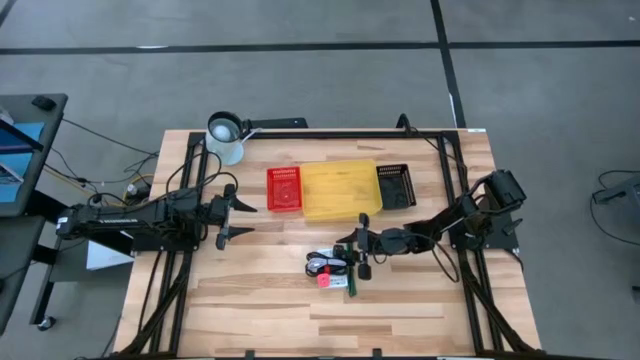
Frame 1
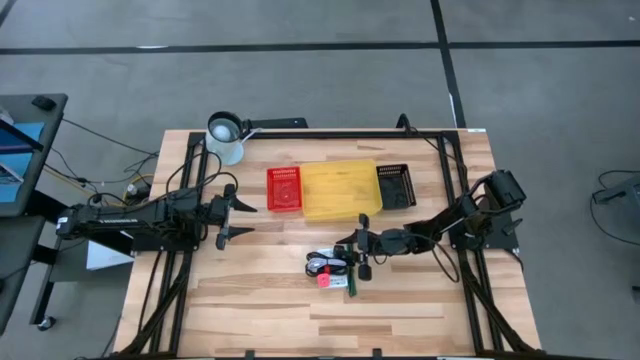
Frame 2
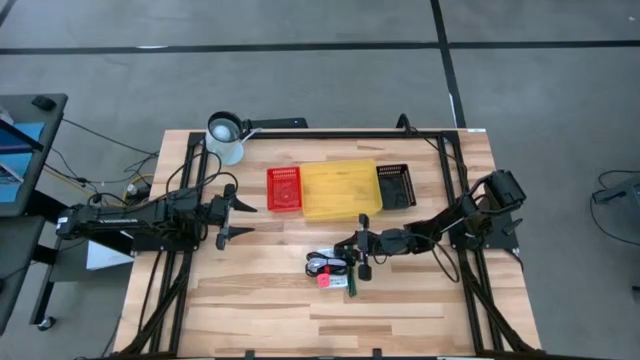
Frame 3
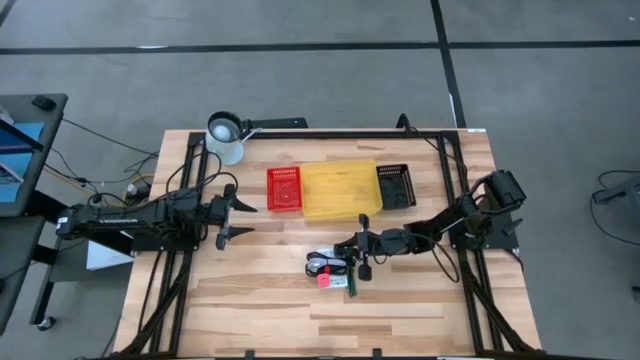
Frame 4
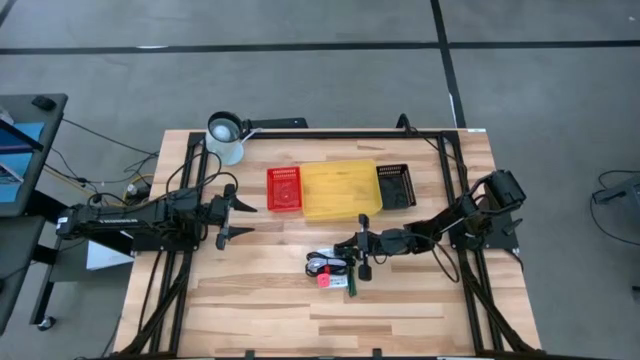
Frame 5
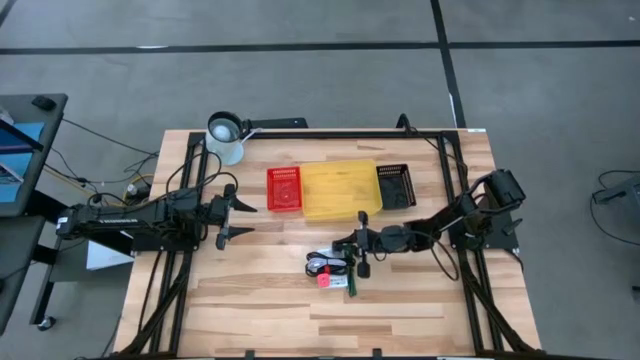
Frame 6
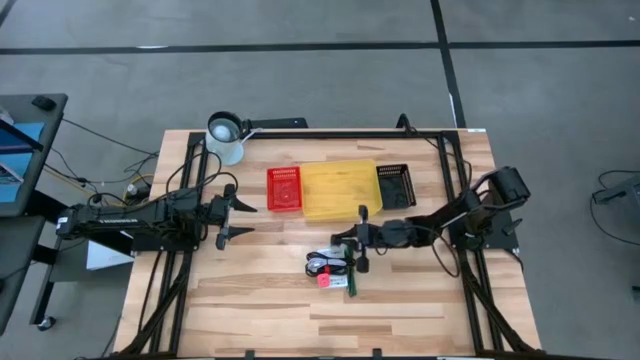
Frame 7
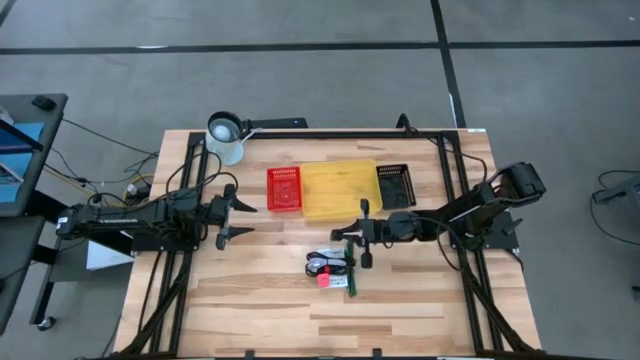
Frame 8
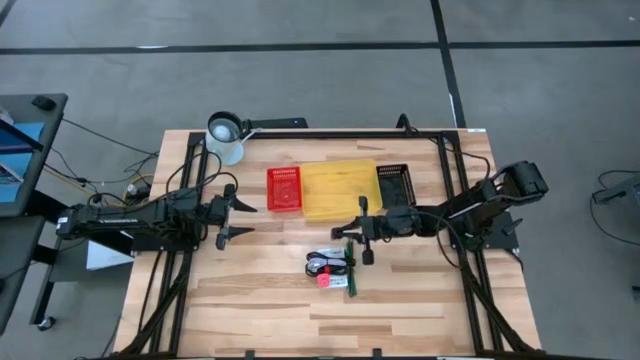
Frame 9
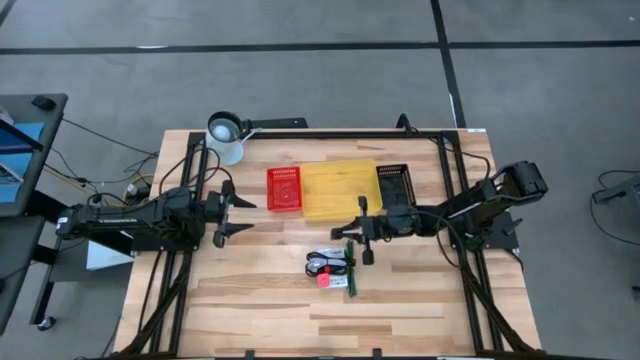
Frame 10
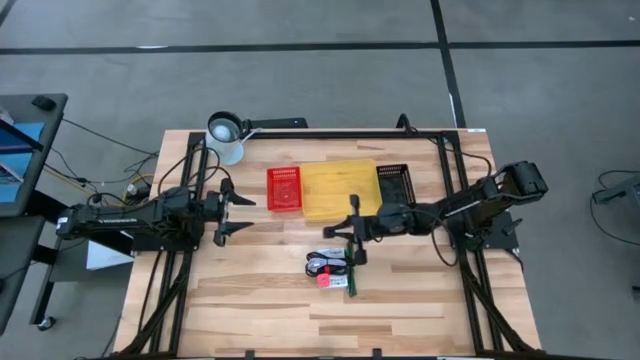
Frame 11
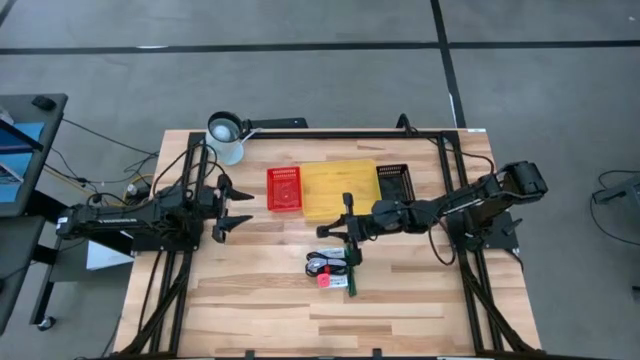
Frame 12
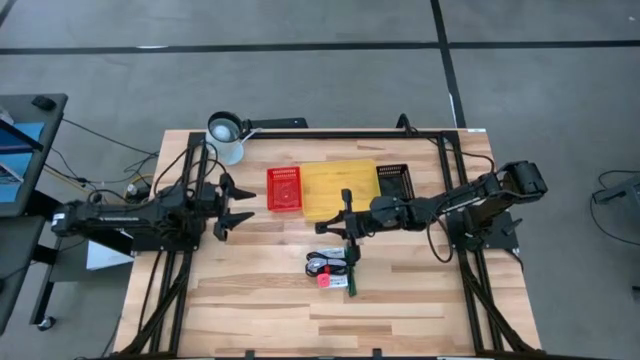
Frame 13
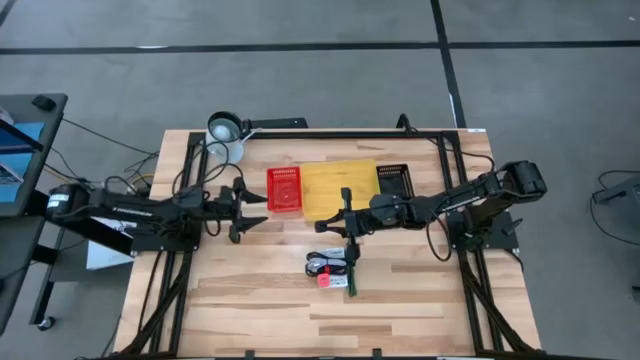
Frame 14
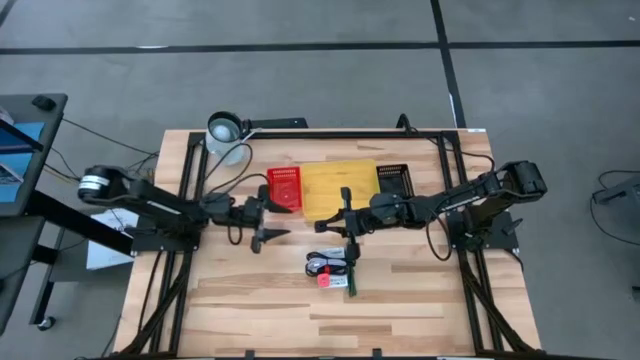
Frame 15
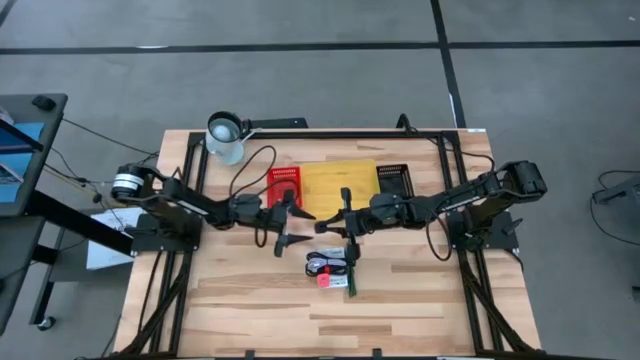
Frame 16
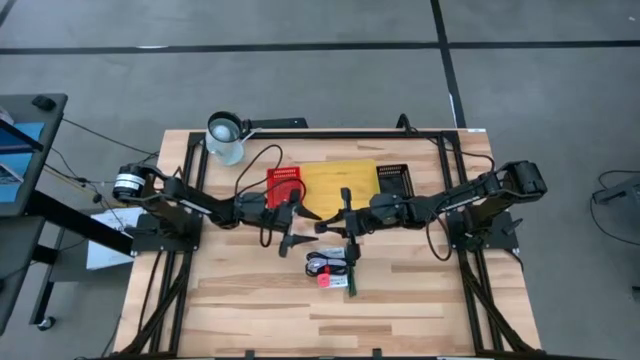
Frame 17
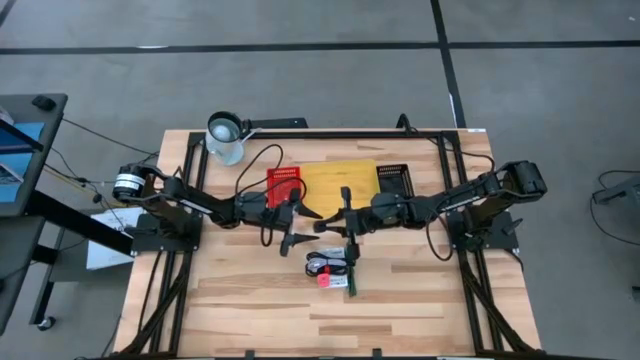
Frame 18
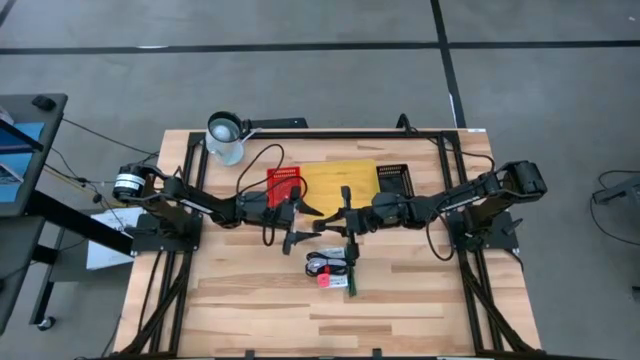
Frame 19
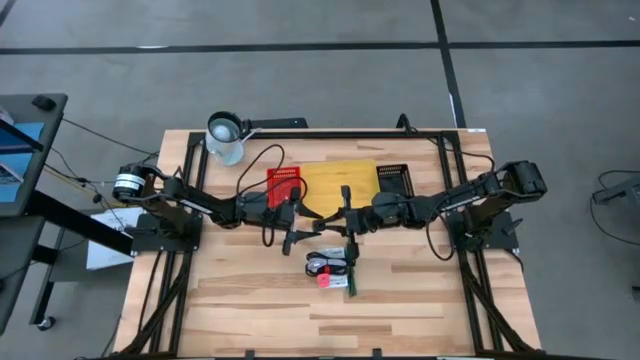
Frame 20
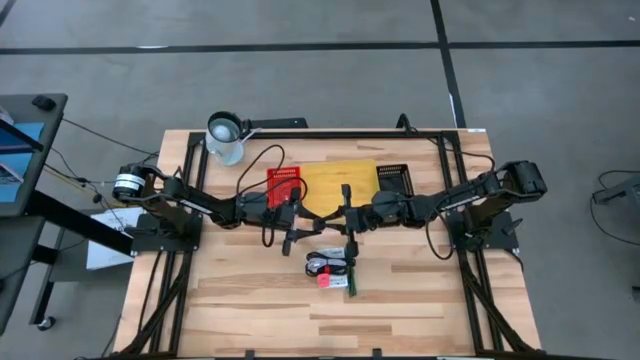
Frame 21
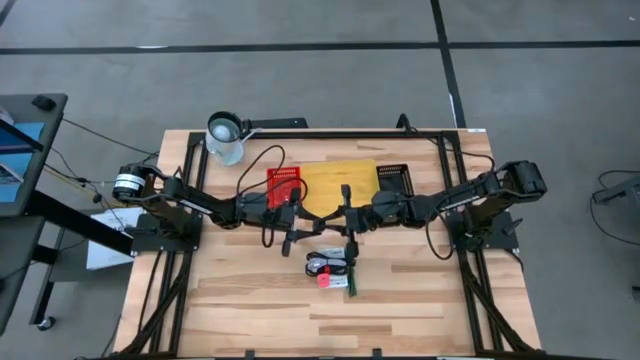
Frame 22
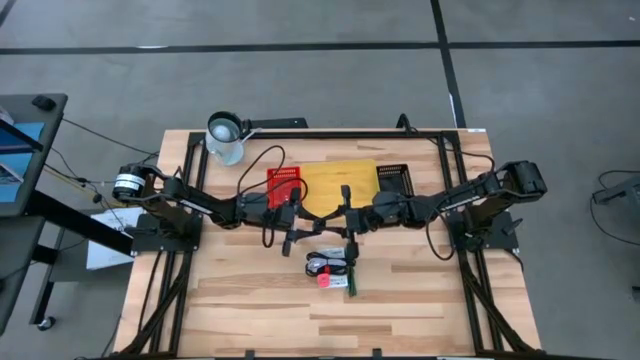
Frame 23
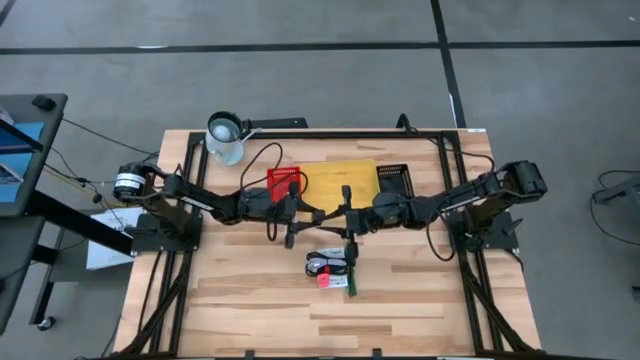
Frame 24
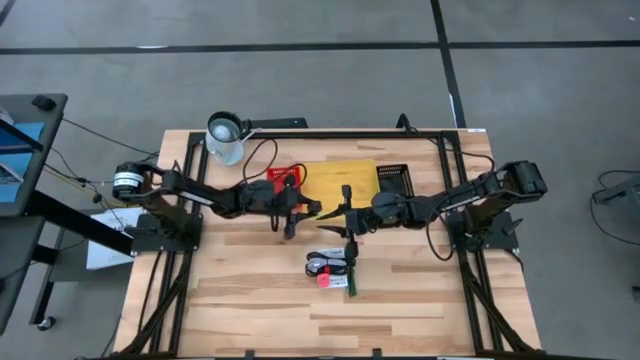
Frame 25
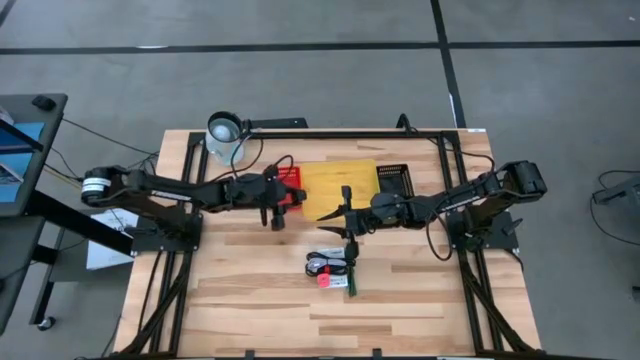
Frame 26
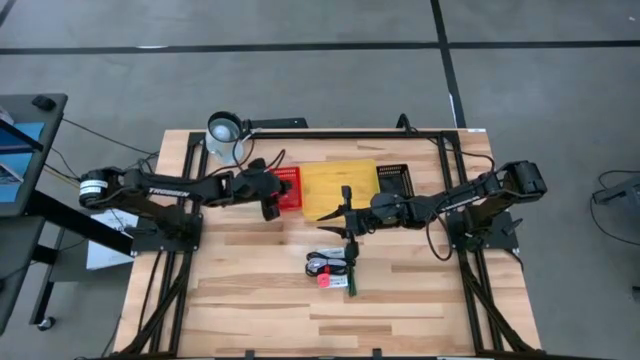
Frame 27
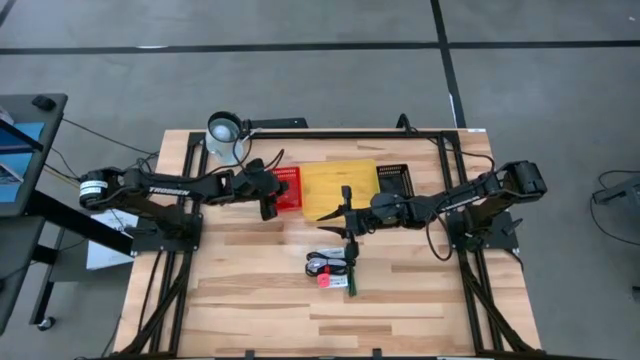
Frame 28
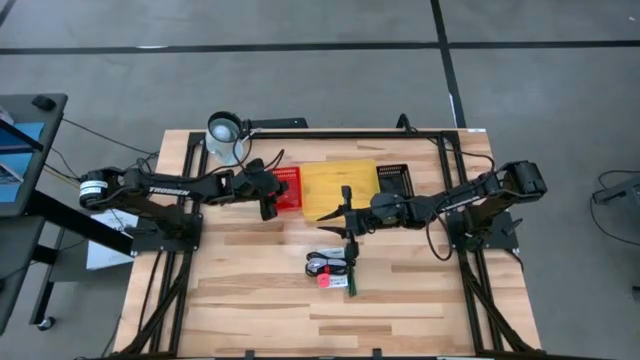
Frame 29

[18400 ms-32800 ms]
Task: Pick and place items into bin
Put the black charger adapter into the red bin

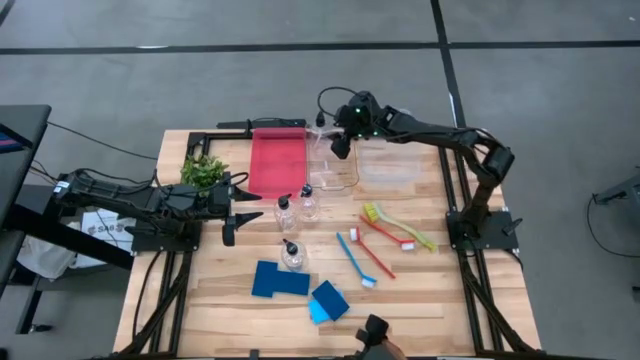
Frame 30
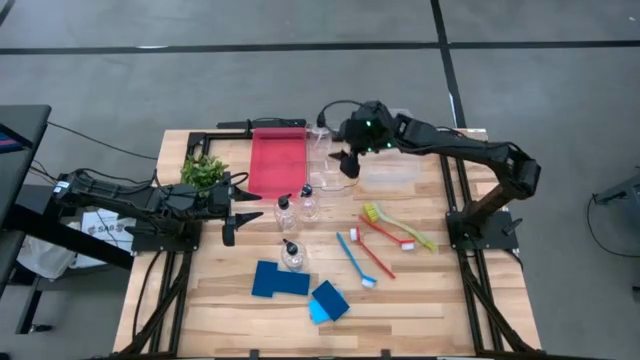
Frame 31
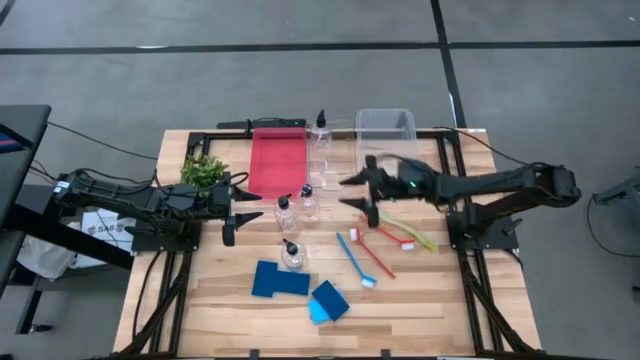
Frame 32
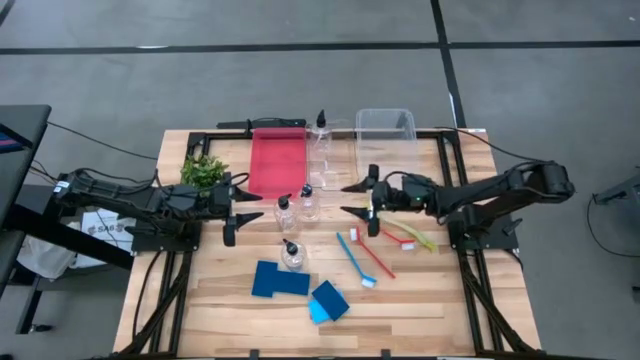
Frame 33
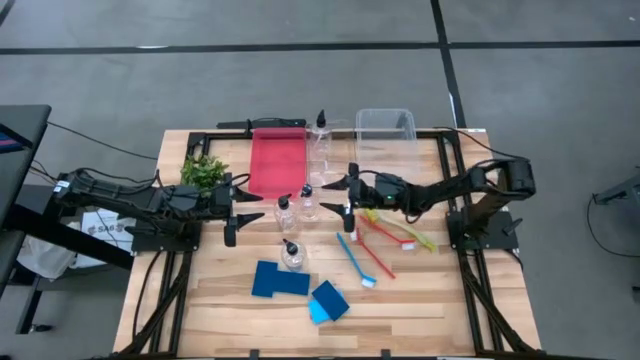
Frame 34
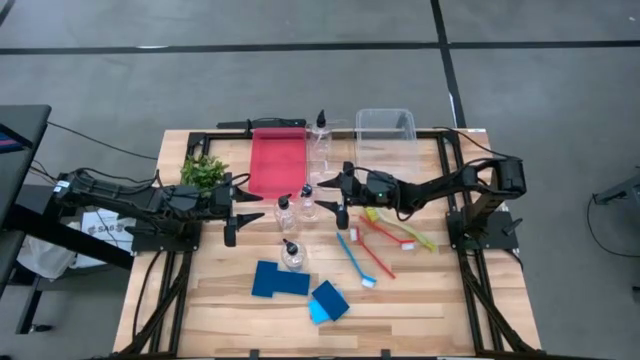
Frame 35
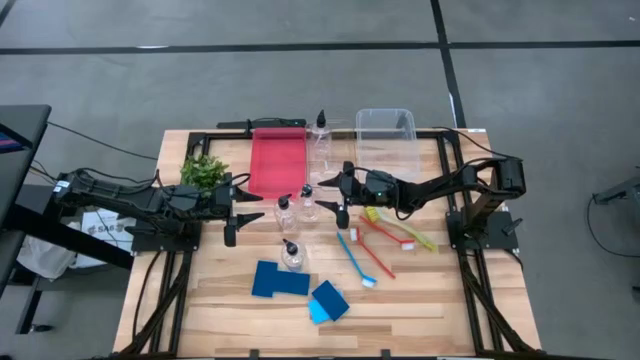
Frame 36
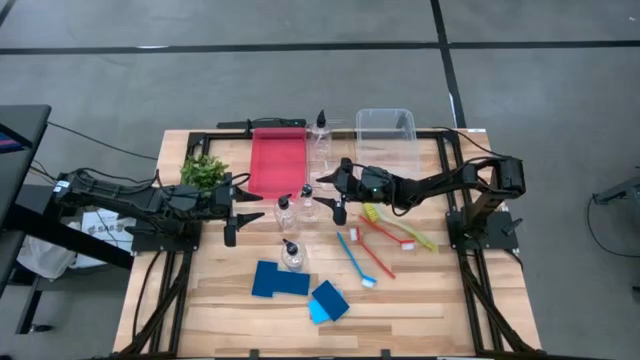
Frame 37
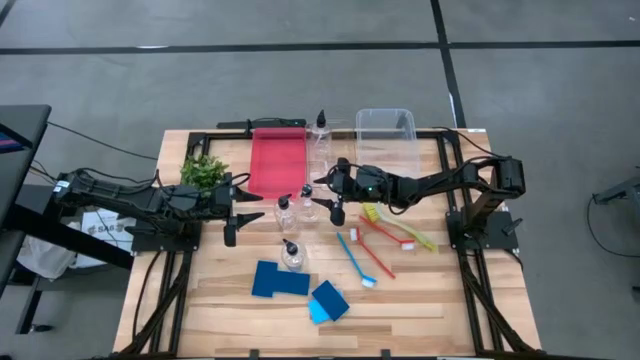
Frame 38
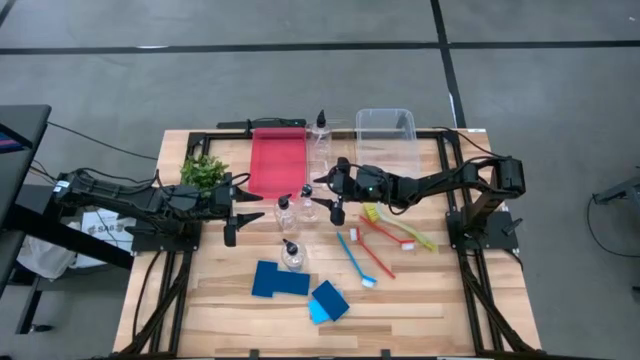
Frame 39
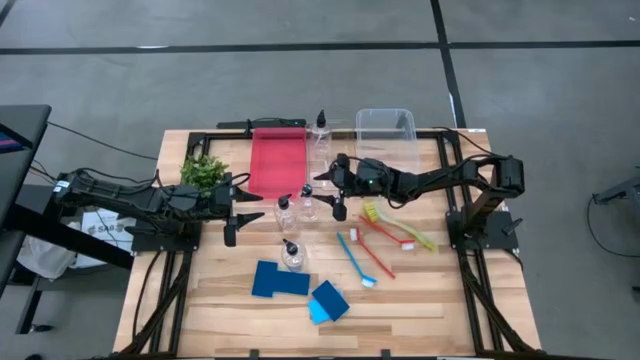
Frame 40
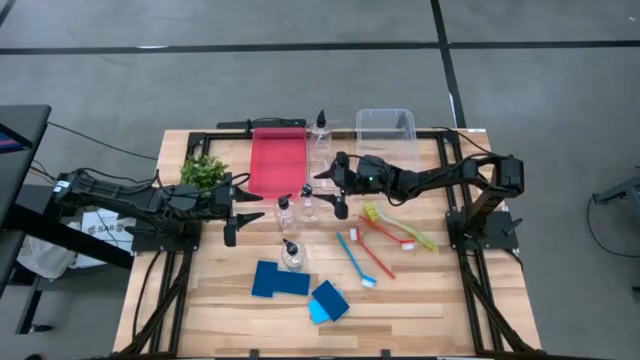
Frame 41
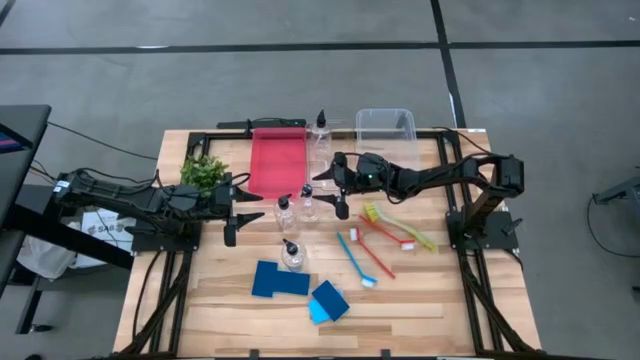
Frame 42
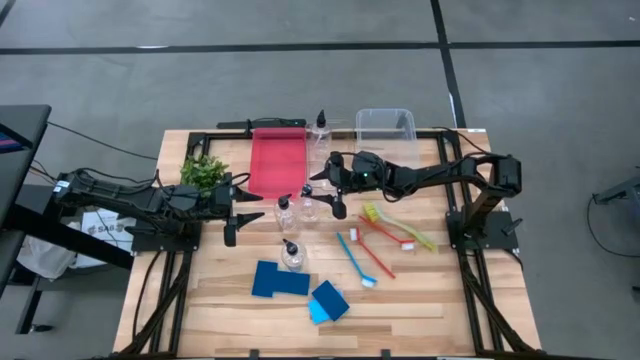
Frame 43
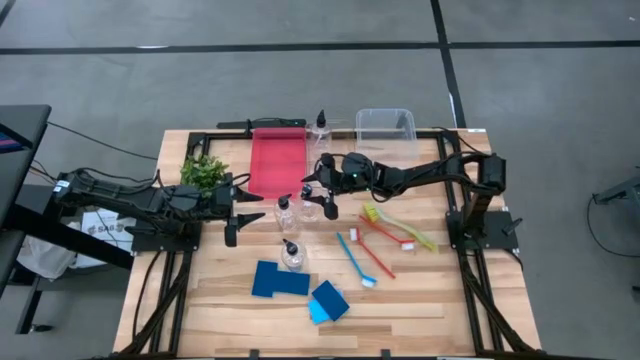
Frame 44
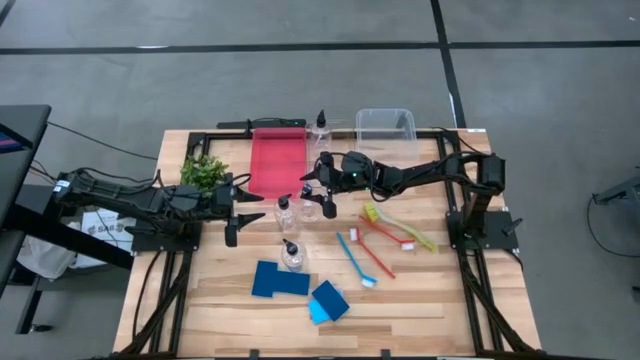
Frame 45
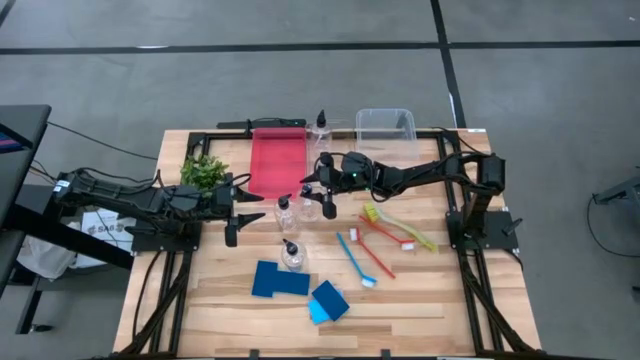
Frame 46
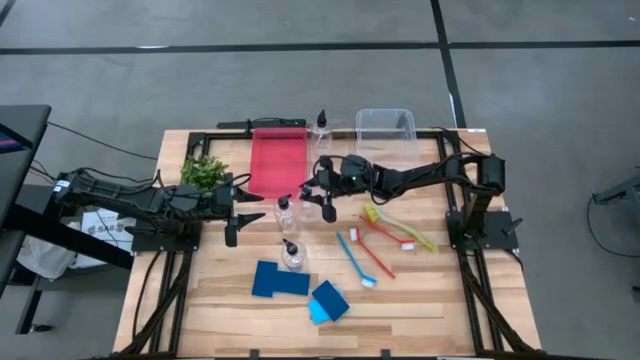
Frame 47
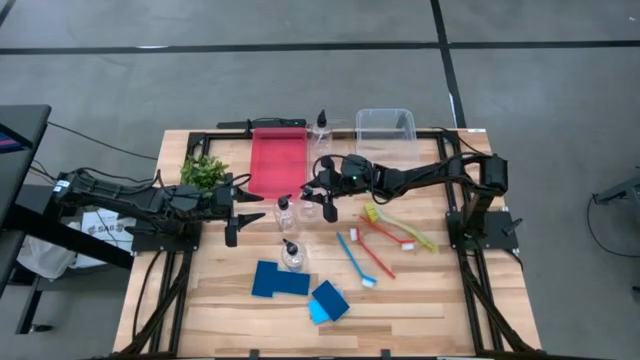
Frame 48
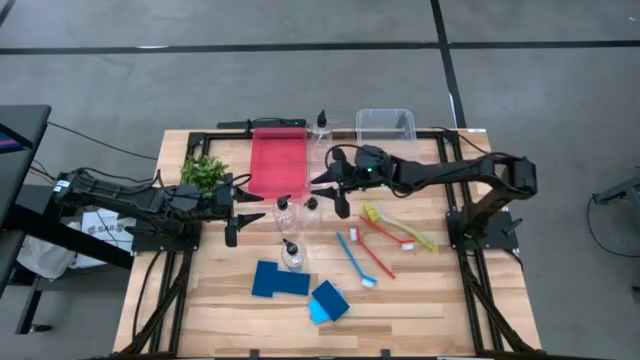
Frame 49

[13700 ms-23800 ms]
Task: Pick & Place Kitchen Sink Supplies
Put the soap dispenser into the left transparent bin
